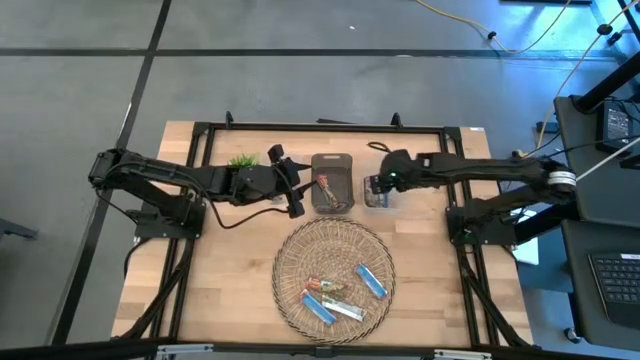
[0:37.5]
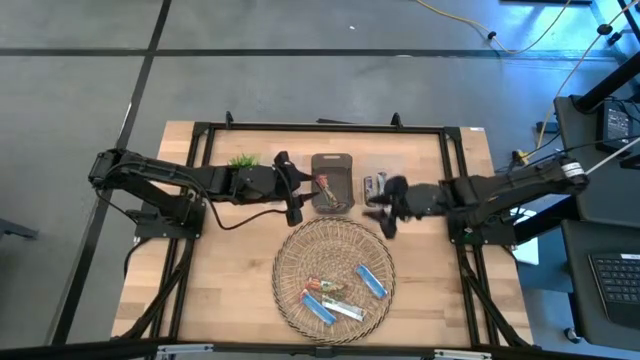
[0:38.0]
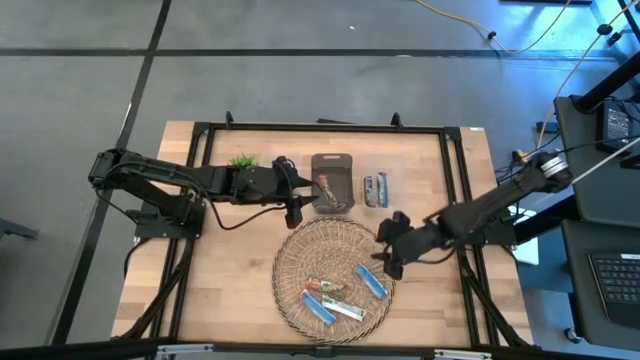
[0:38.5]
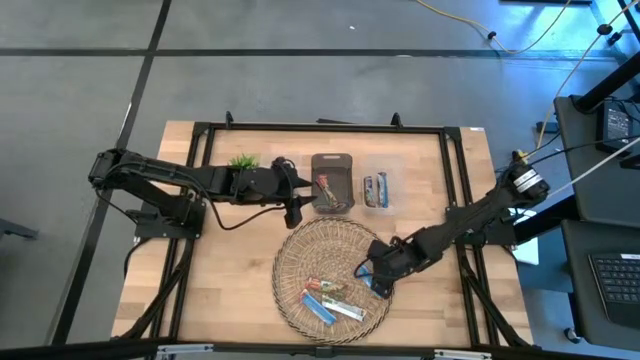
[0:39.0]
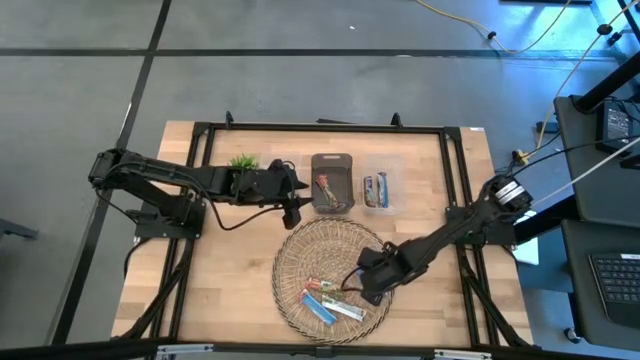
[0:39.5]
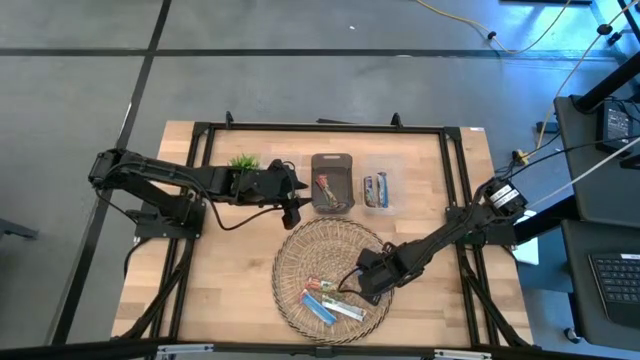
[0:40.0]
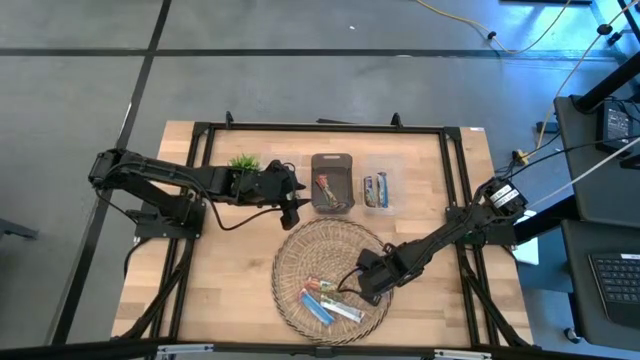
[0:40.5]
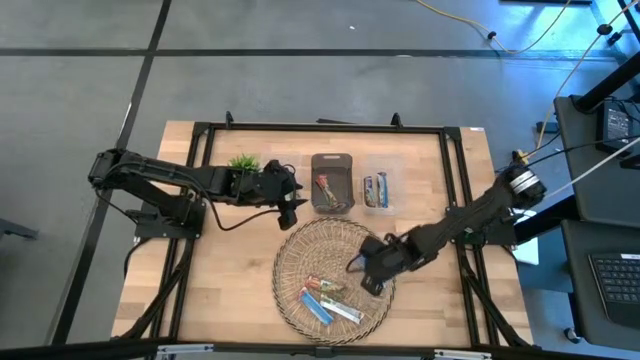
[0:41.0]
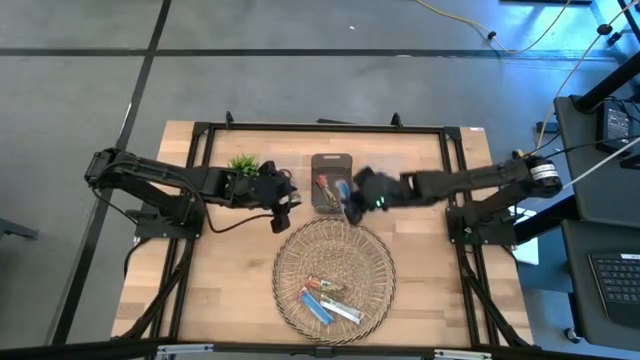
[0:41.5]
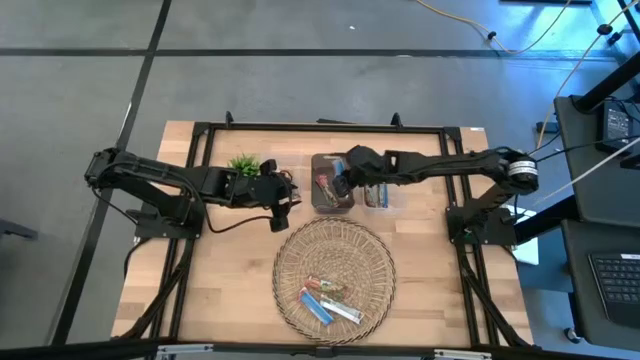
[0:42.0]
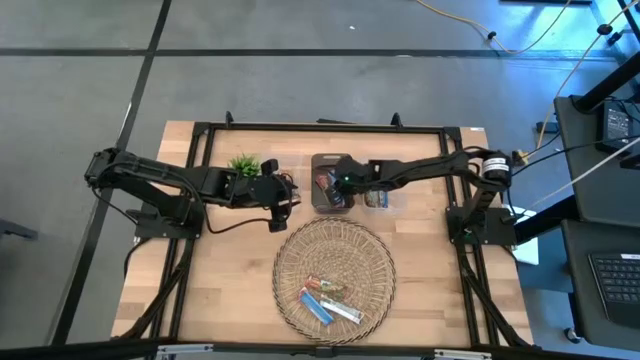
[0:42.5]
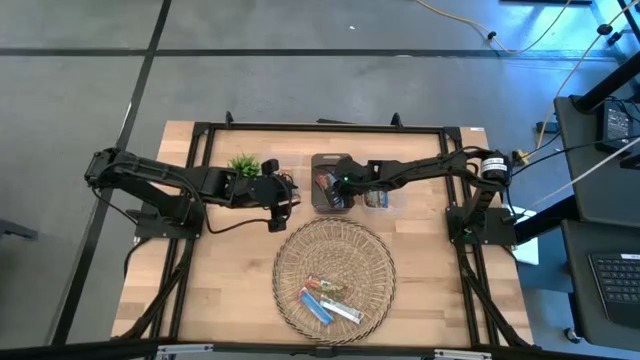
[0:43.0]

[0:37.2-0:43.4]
Task: Pick and place Granola Bars by type
Put the red granola bar into the black bin

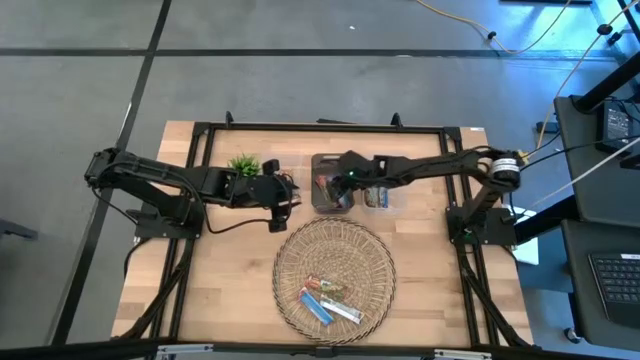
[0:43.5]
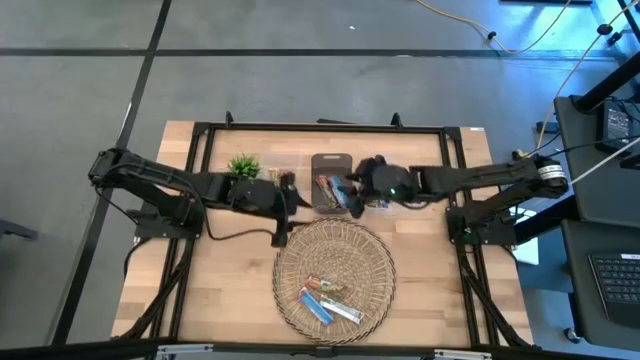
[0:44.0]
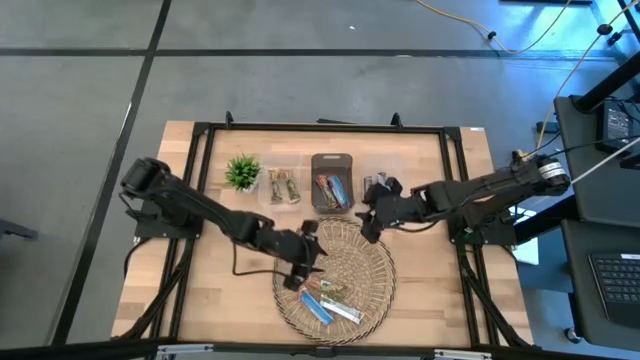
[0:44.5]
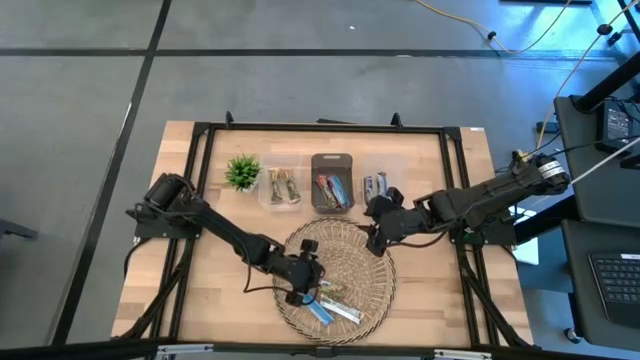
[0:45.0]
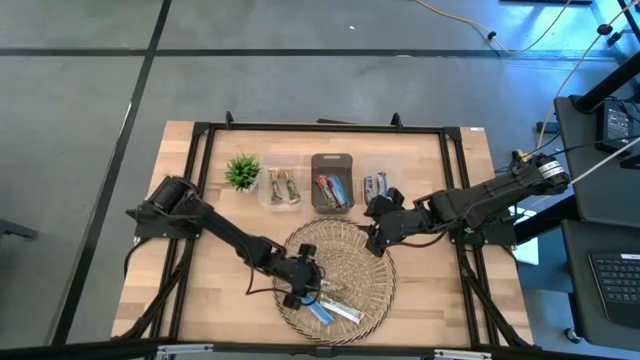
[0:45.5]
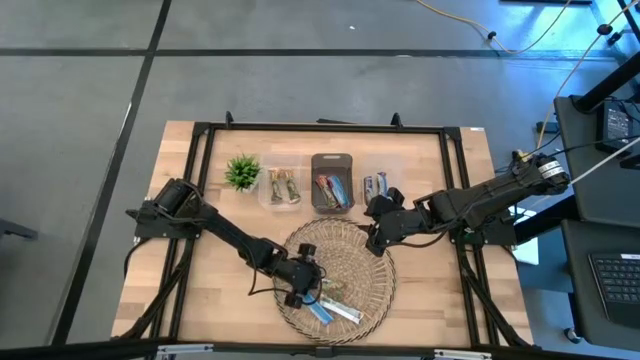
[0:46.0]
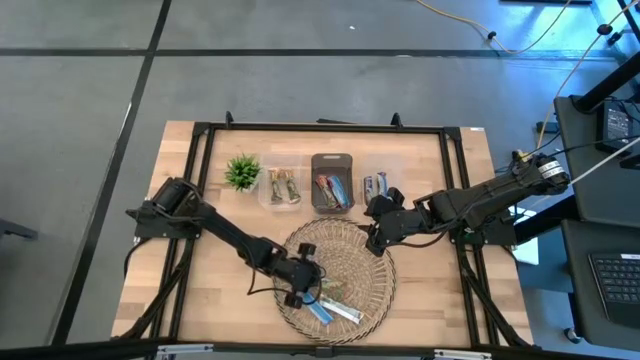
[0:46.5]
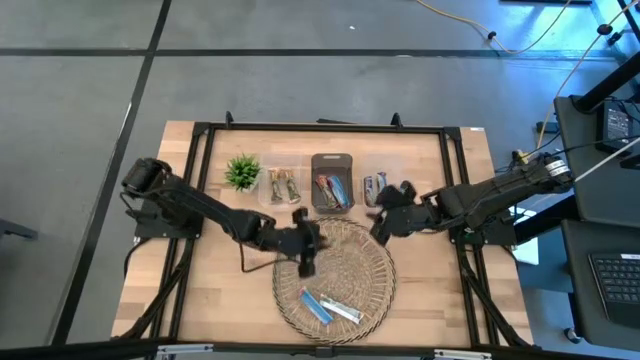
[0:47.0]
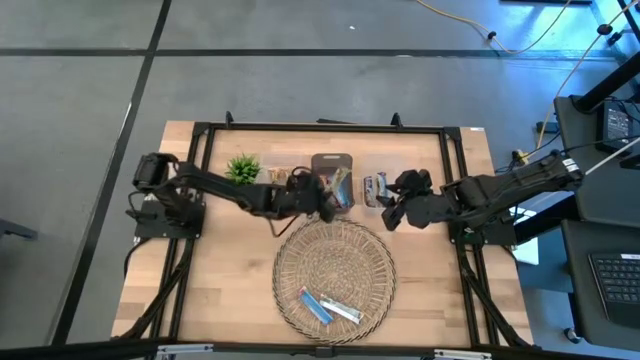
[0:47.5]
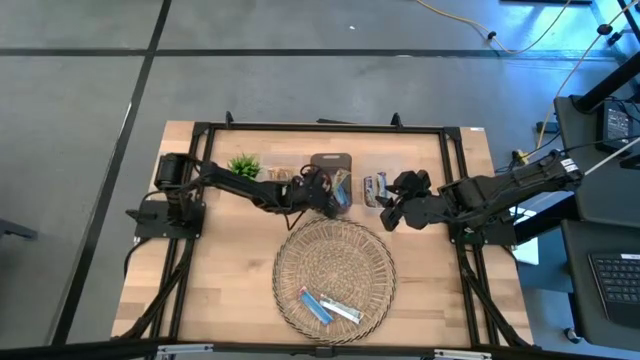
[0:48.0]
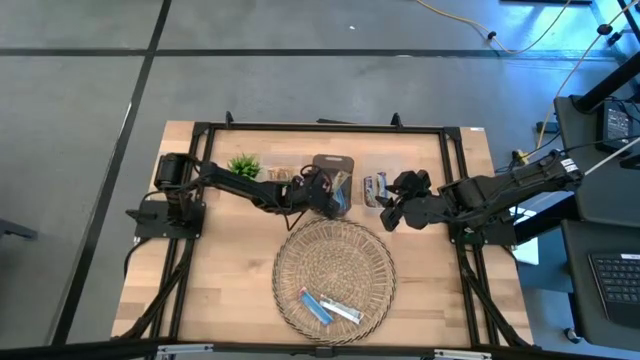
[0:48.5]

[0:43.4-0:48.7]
Put the red granola bar into the black bin

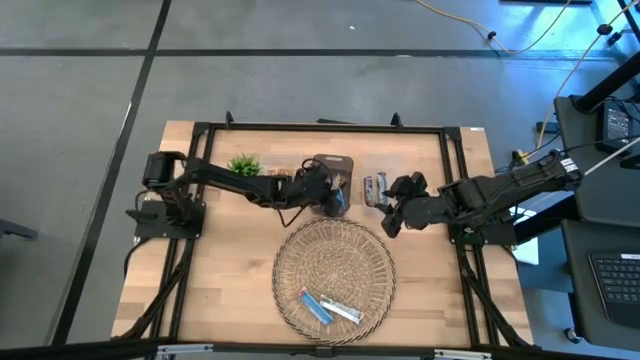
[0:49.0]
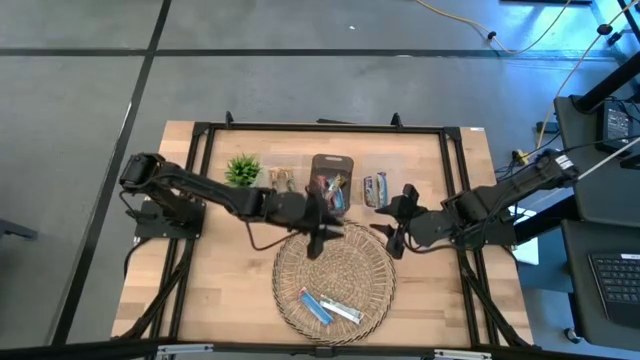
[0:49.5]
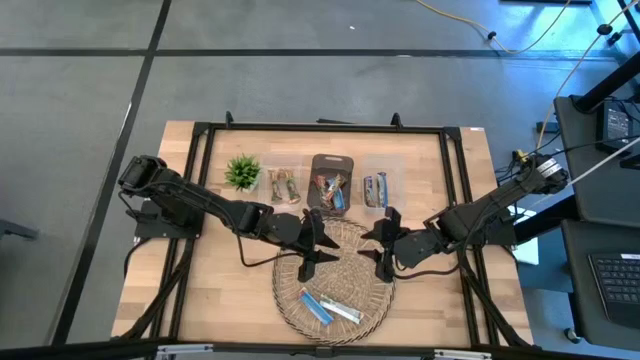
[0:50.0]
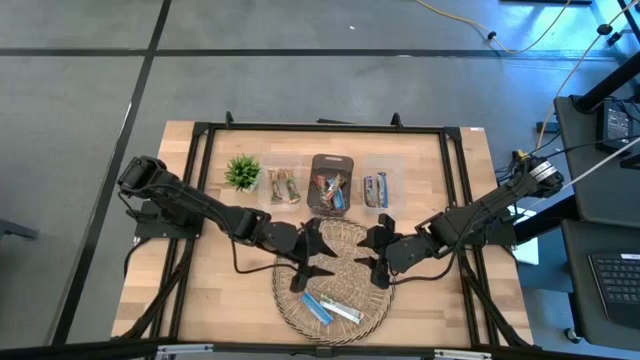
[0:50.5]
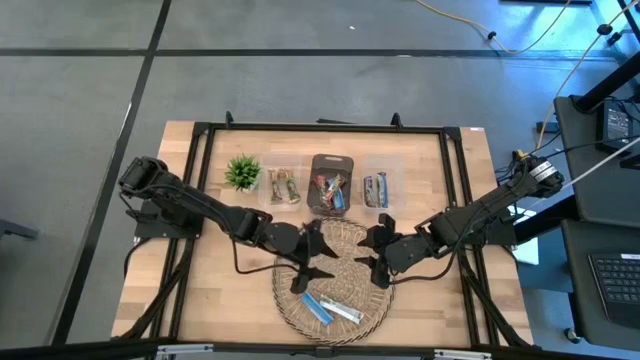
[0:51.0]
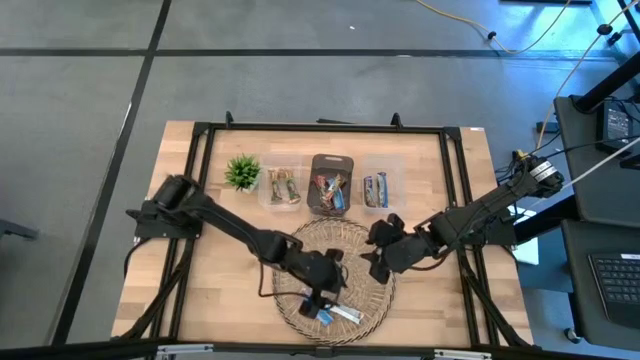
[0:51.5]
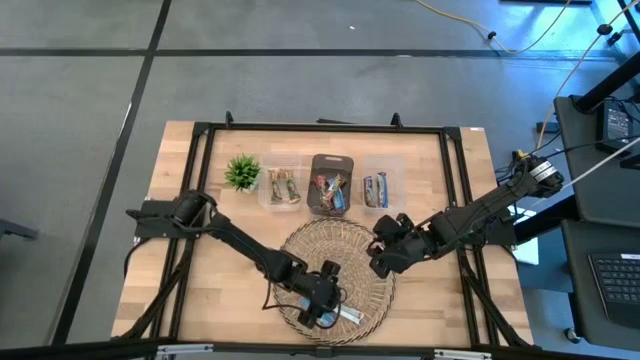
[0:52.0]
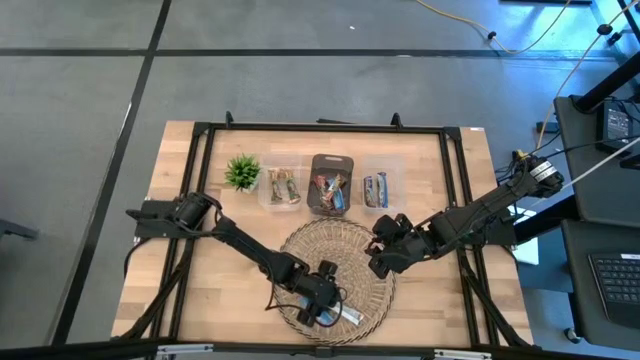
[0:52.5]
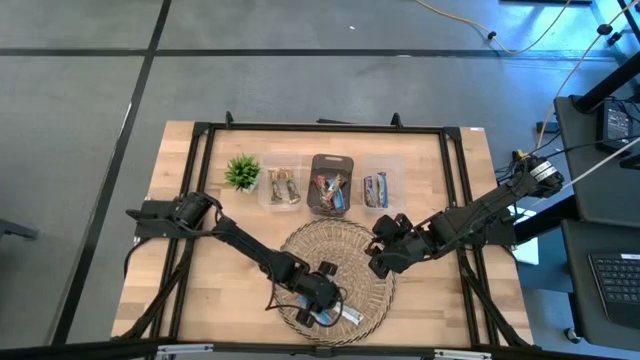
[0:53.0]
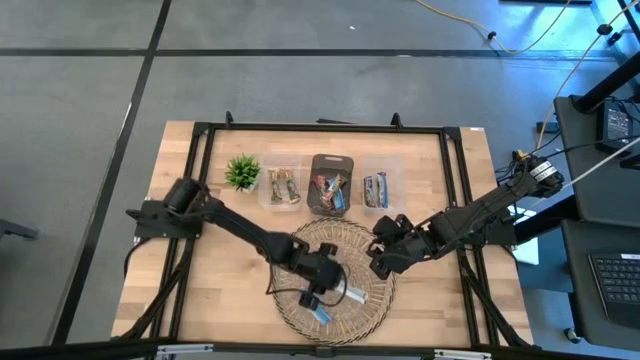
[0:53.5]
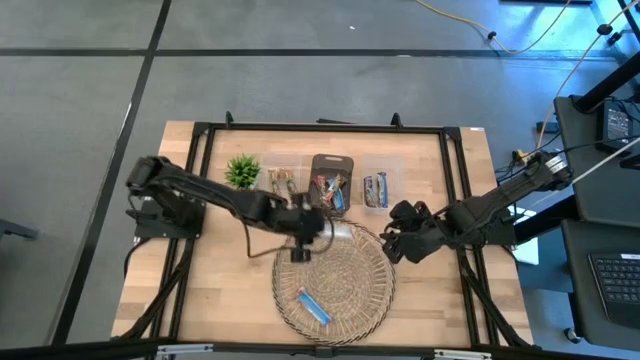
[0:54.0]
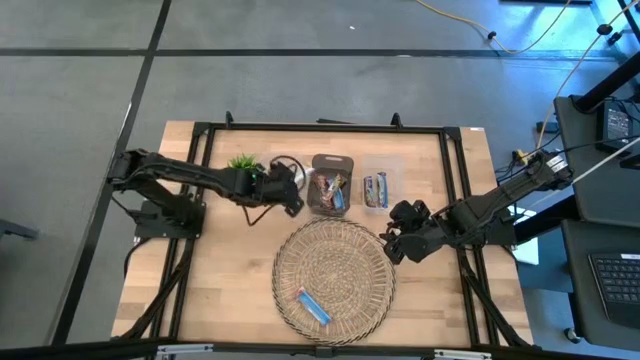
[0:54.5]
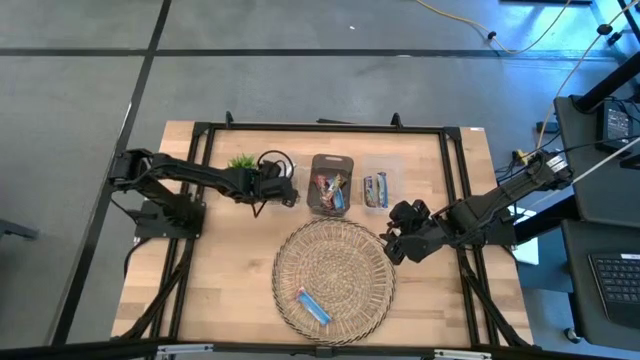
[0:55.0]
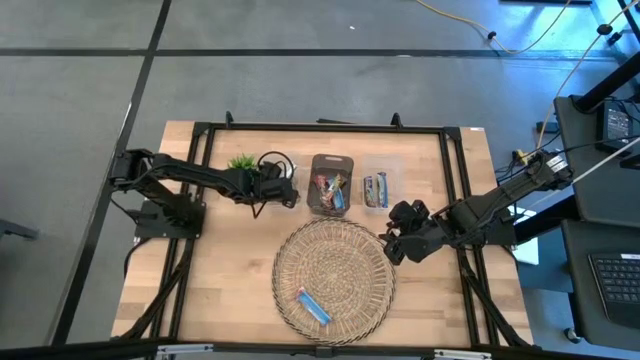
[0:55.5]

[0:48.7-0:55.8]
Put the orange granola bar into the left transparent bin

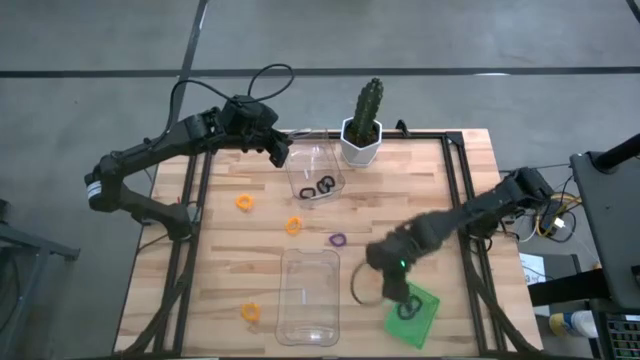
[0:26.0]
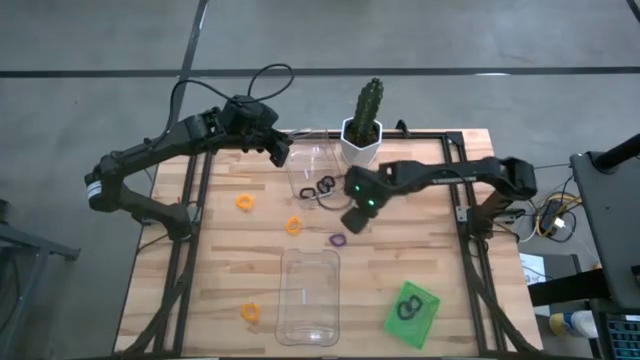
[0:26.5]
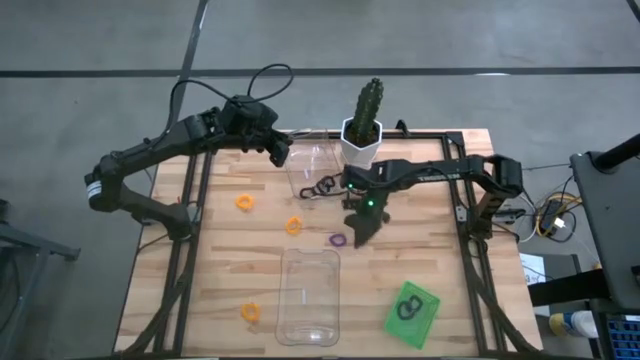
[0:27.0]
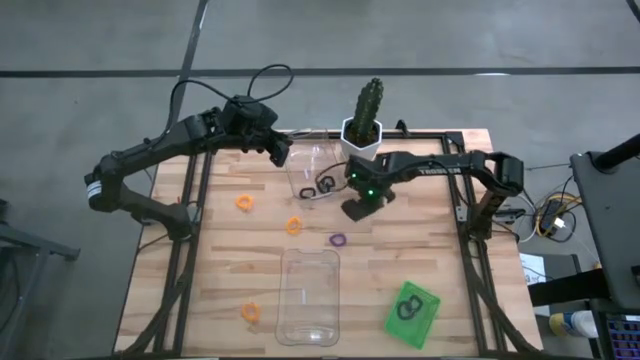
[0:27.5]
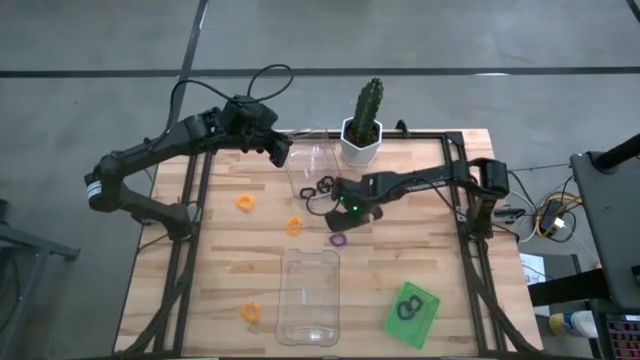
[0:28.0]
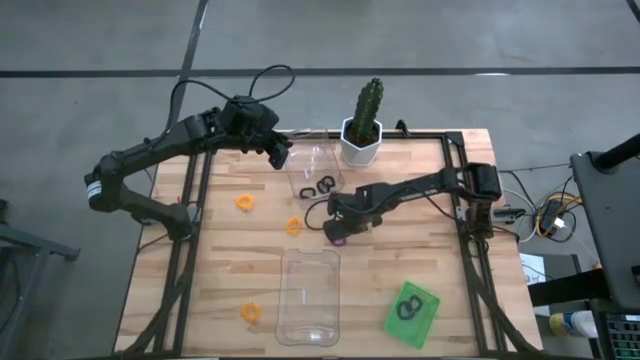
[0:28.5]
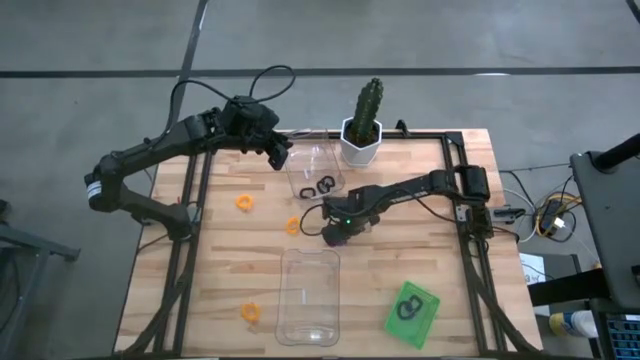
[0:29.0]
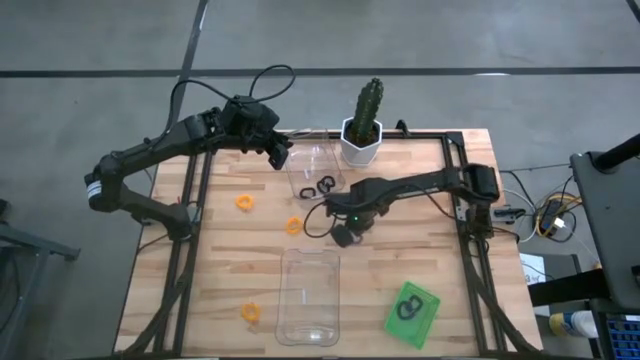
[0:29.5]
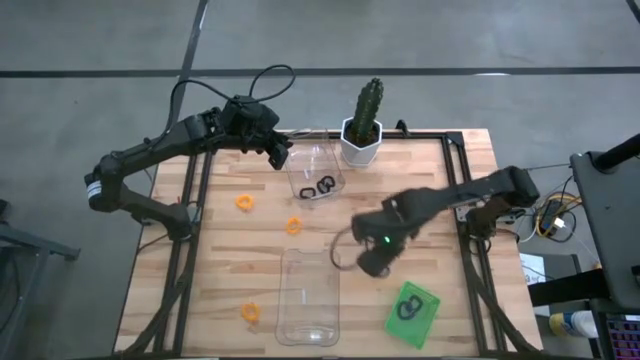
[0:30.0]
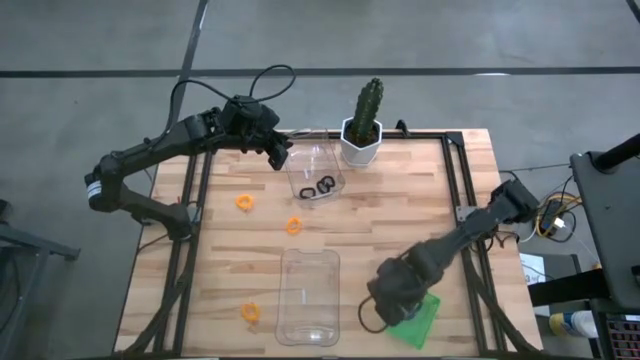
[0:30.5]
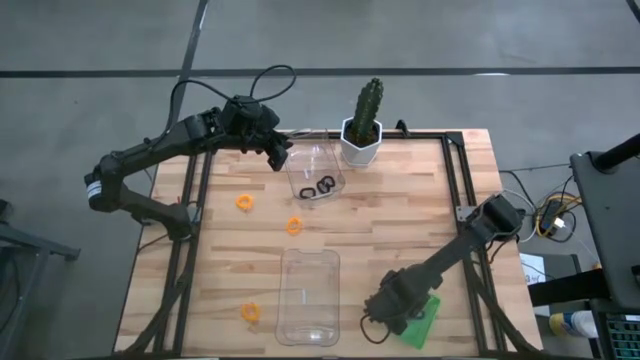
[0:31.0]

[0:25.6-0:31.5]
Task: Sort spring keychains
Put the purple spring keychain into the green bin
